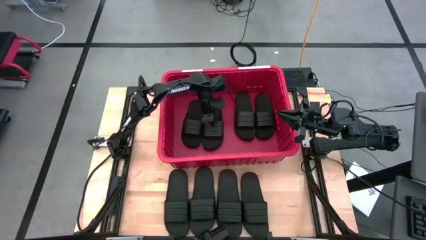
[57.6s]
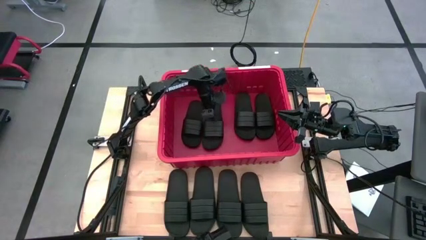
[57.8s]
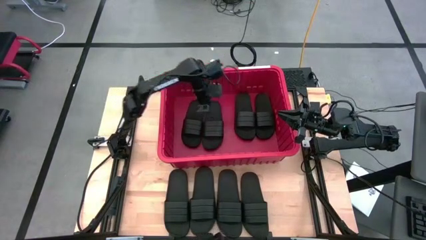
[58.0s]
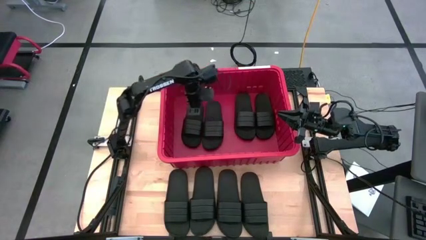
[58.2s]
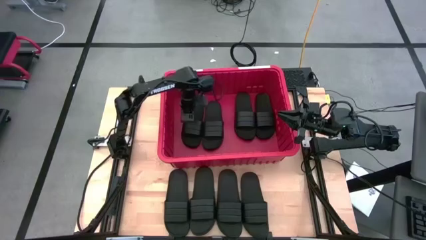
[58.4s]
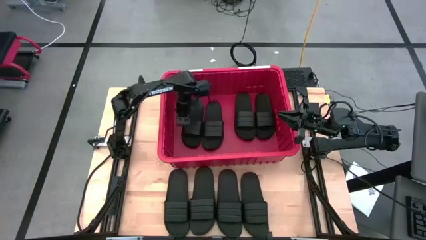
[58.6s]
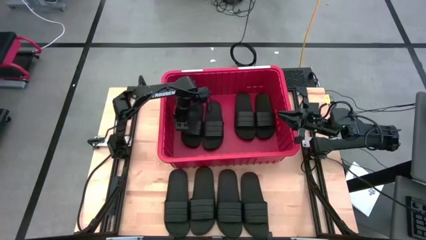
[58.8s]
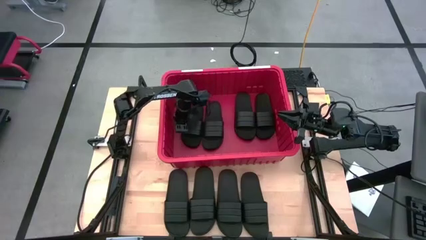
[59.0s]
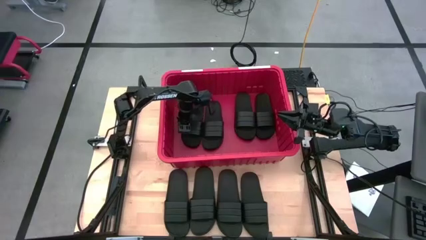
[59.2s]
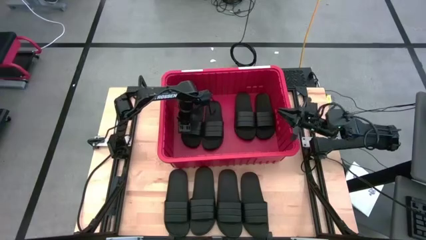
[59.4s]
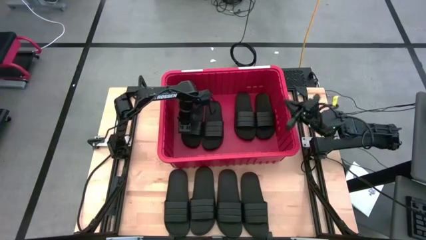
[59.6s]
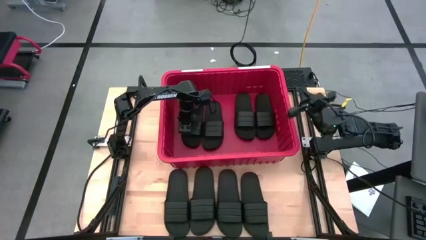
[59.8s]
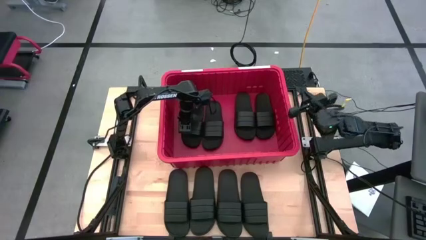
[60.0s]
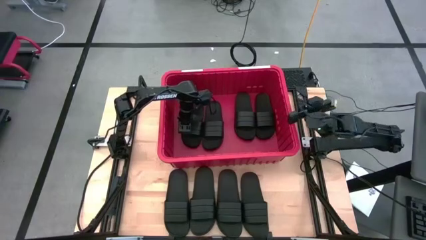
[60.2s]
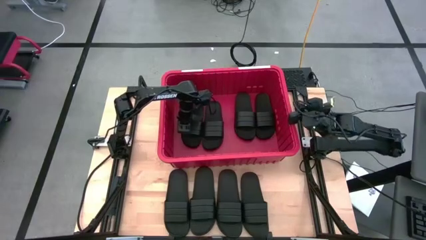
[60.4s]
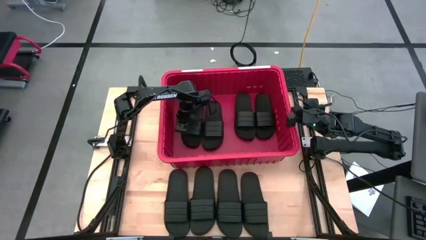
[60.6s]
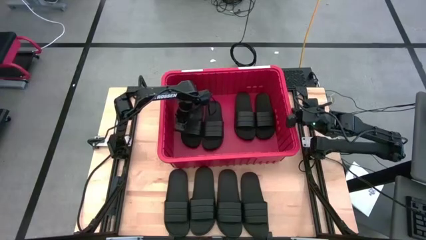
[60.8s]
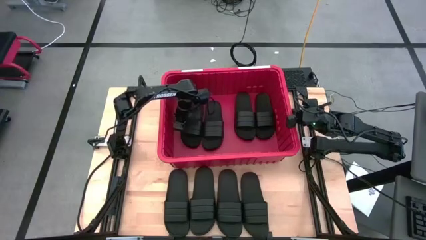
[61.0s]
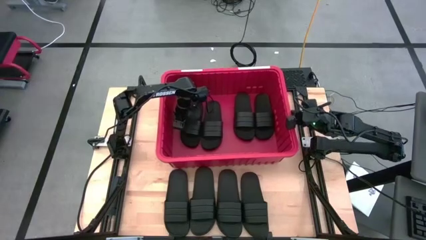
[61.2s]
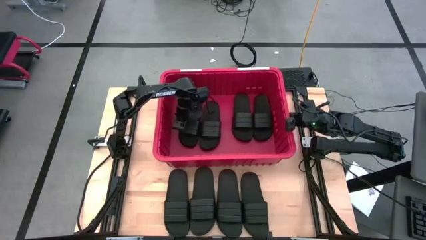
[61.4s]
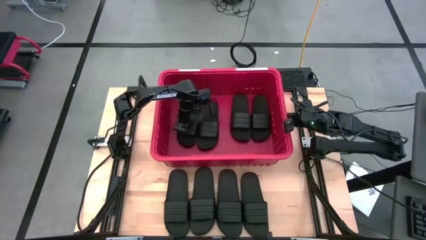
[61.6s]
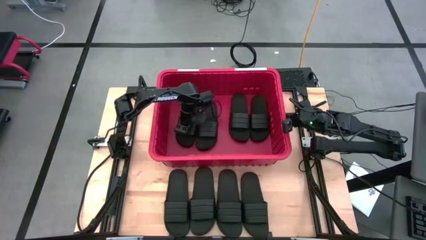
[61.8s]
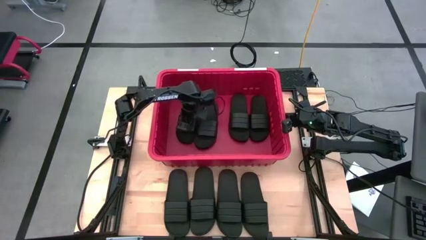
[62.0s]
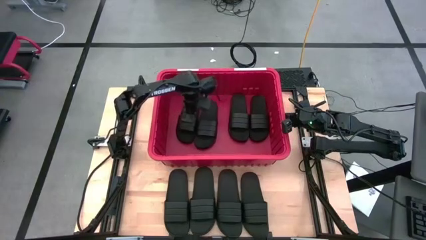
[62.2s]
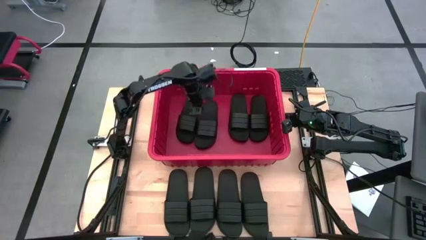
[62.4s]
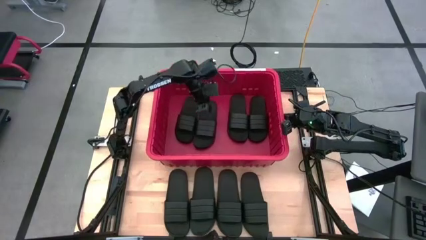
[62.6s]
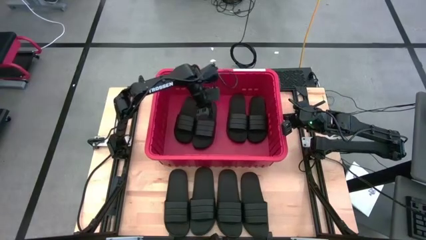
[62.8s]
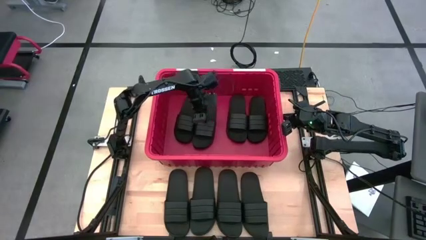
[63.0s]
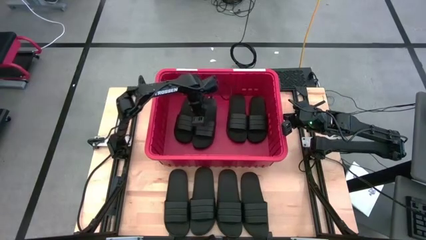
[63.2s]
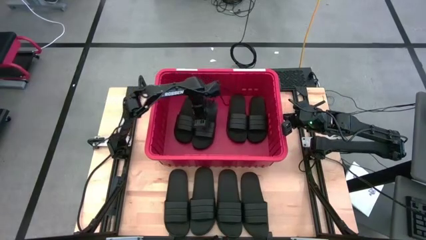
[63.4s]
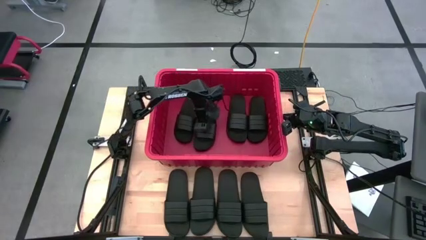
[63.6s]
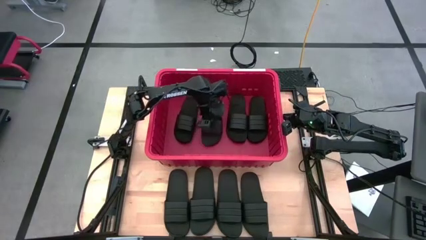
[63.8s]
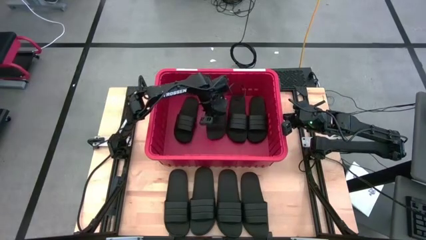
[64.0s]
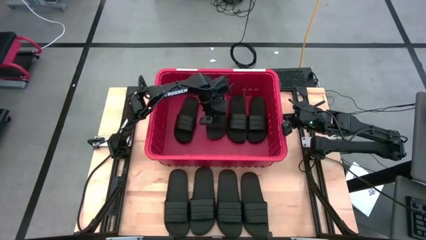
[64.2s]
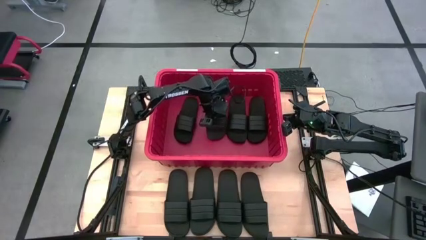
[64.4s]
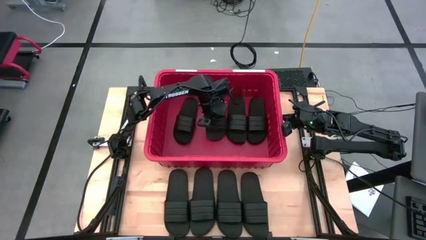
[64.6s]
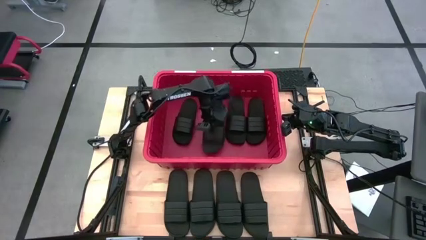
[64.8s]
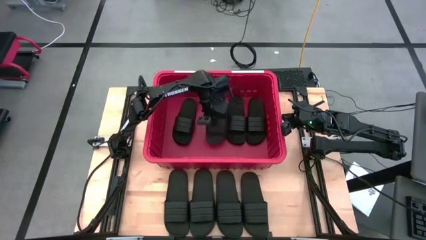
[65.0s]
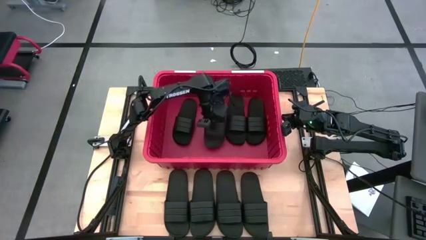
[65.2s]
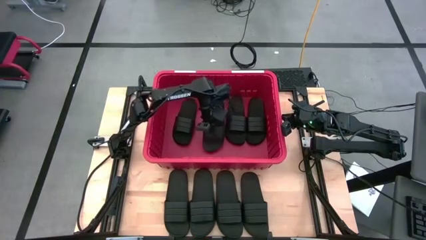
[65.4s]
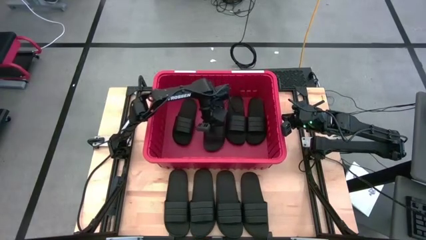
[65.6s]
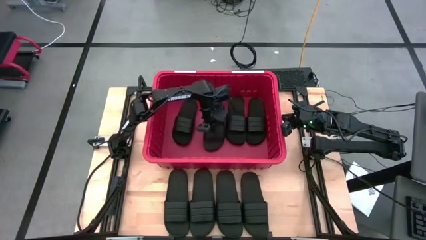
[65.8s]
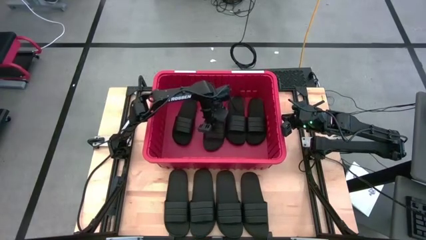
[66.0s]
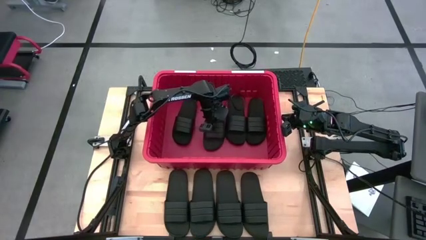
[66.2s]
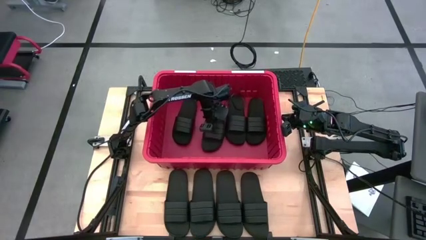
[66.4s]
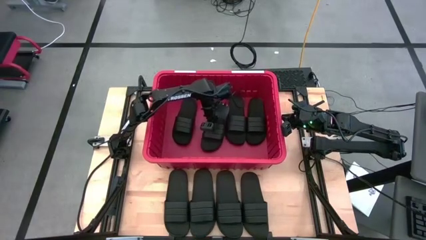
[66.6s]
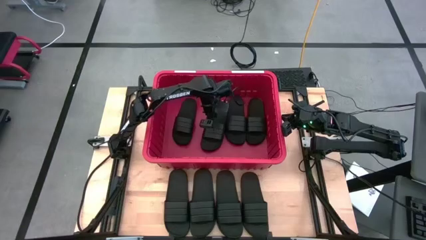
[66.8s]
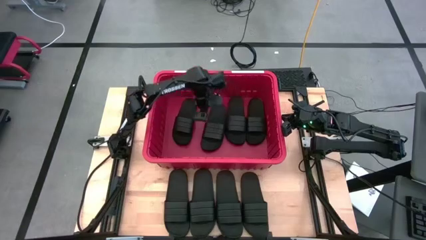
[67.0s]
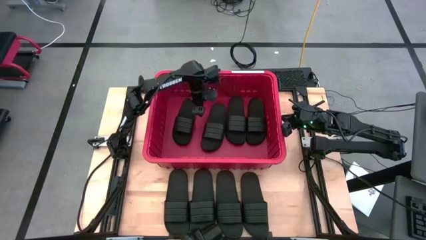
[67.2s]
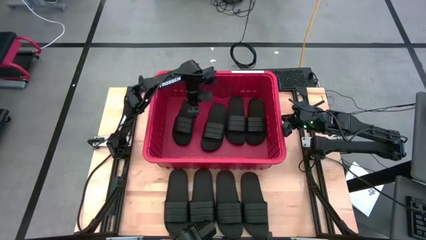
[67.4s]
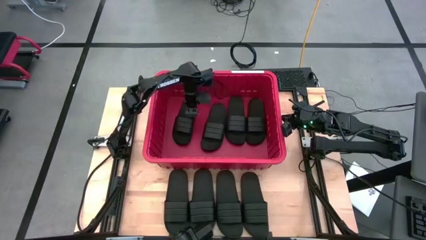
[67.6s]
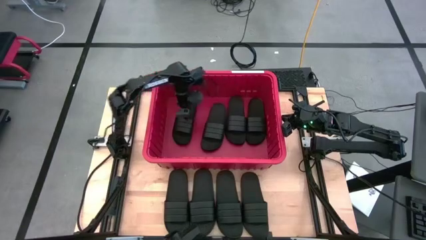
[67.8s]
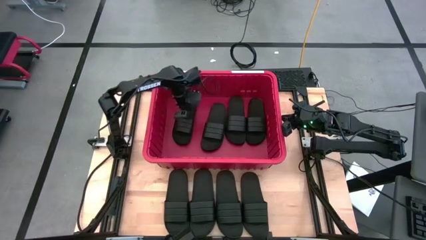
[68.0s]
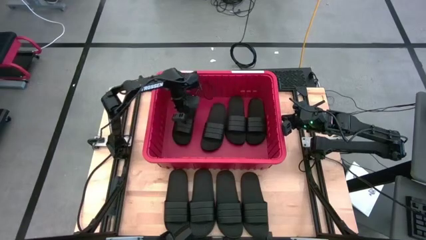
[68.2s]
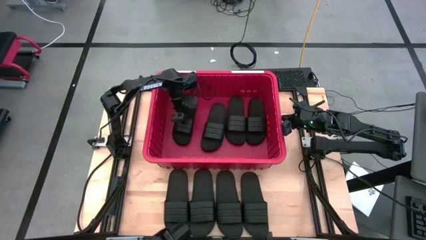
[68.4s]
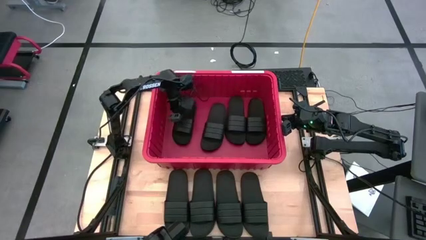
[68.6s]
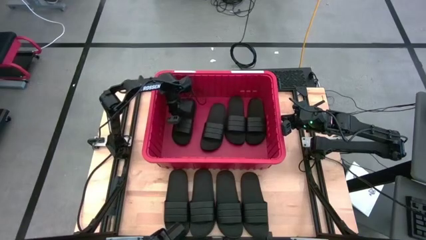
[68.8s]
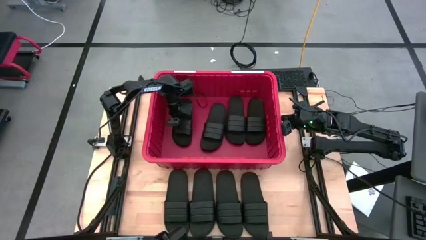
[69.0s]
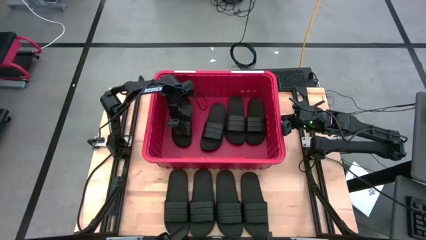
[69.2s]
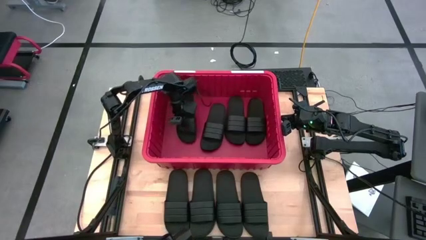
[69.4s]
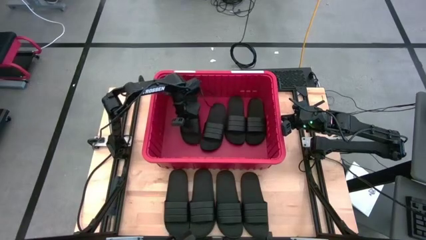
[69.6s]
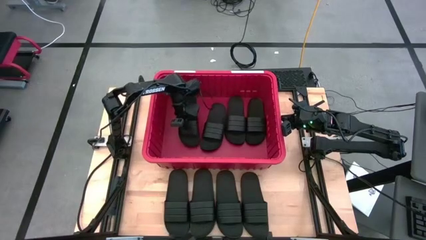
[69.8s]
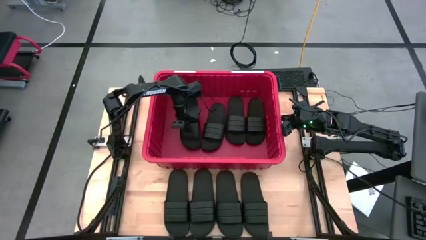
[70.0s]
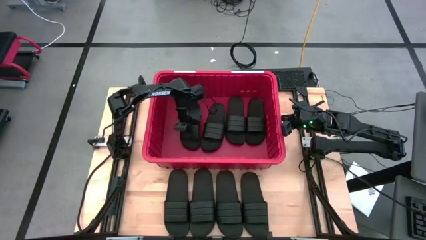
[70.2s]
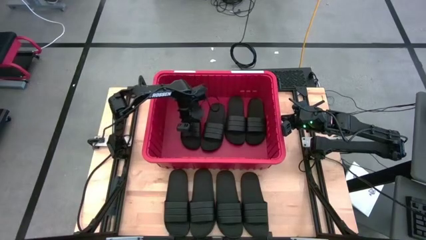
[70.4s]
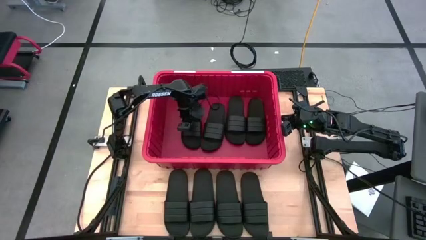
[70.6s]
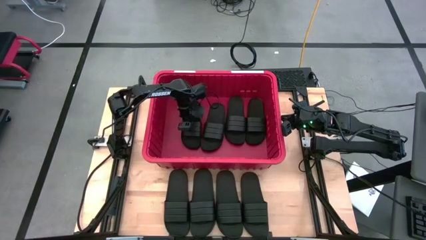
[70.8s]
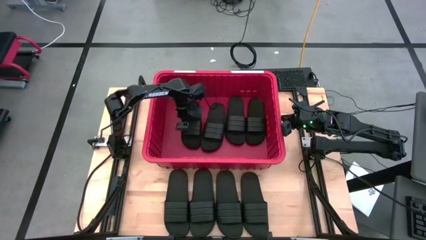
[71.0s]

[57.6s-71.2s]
Task: Pick and place slides into bin
Adjust the black slides in the red bin

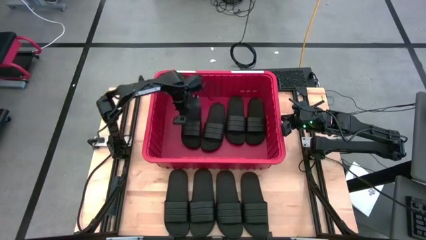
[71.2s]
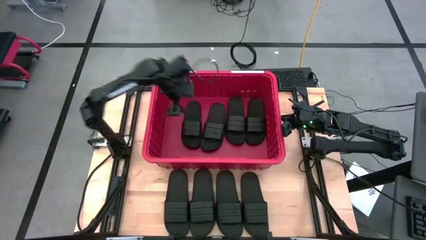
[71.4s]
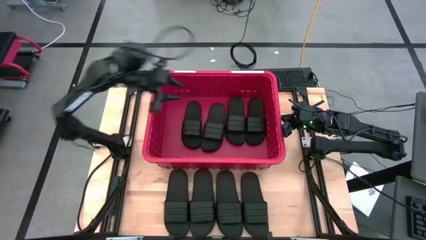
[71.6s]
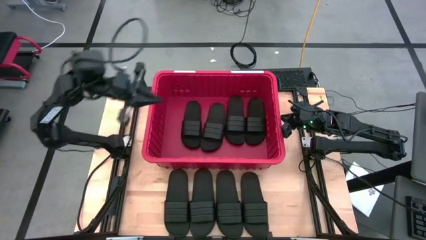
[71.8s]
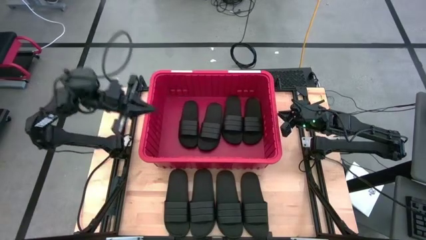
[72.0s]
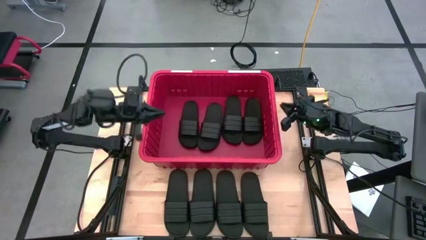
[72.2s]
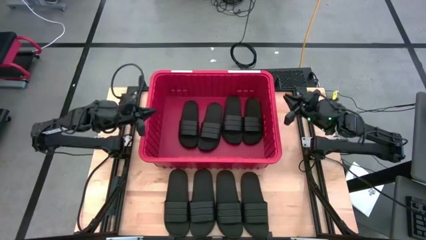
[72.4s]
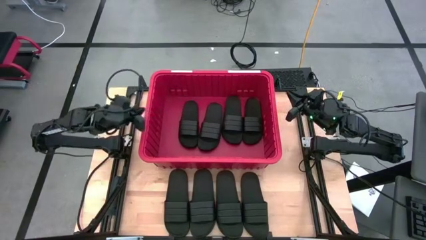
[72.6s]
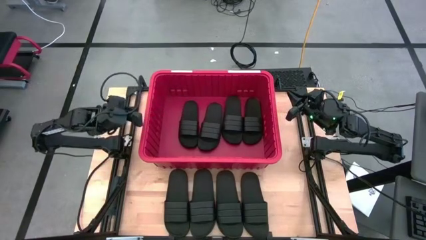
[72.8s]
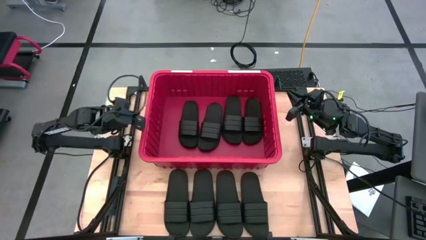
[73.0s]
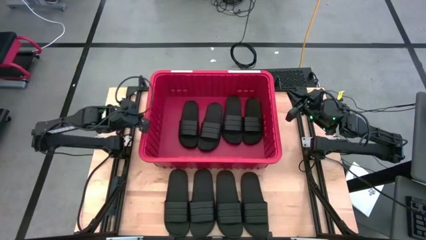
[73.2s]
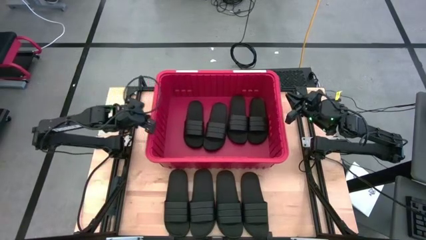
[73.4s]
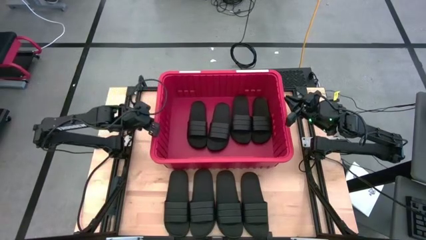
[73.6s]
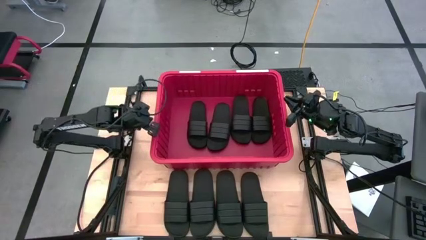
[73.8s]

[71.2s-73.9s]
Adjust the red bin
